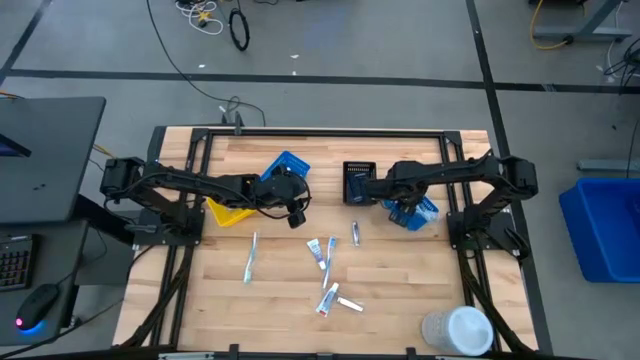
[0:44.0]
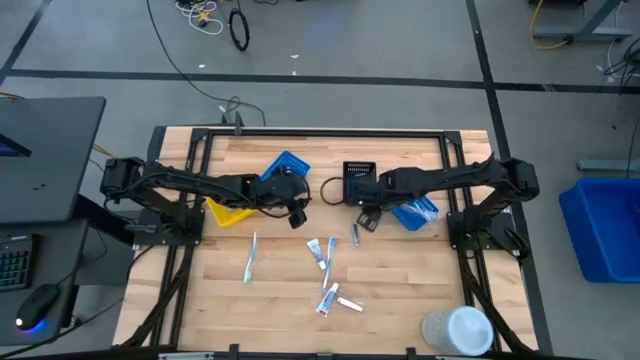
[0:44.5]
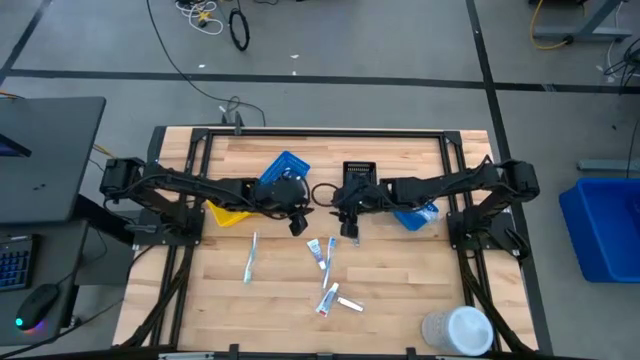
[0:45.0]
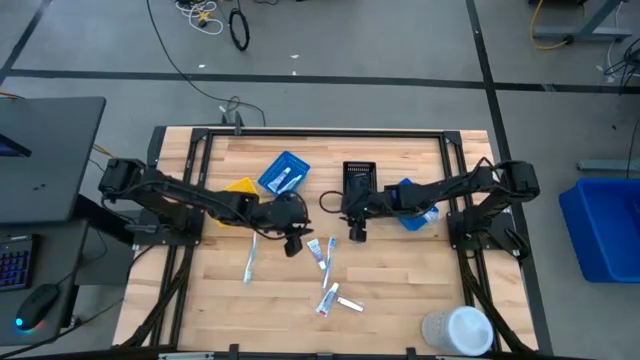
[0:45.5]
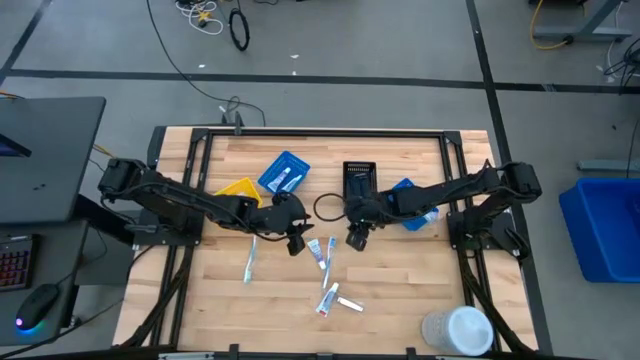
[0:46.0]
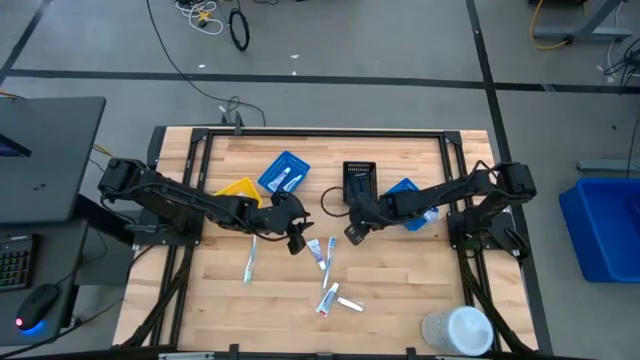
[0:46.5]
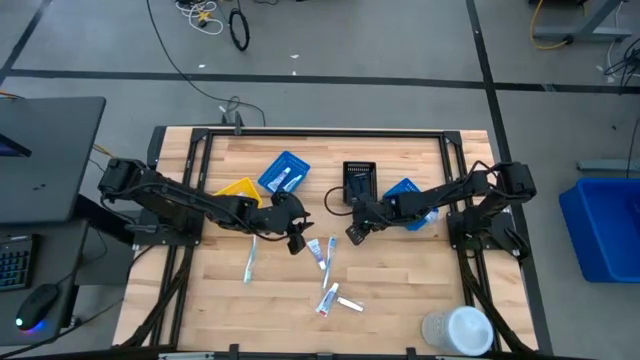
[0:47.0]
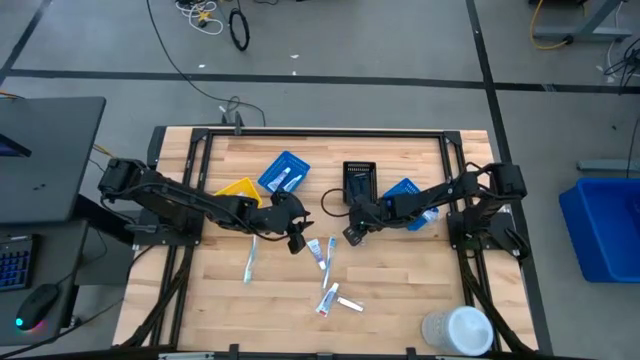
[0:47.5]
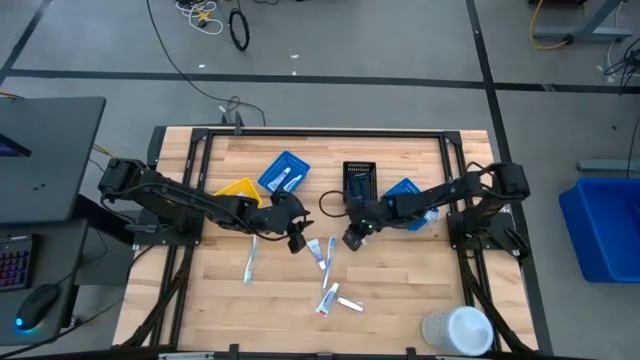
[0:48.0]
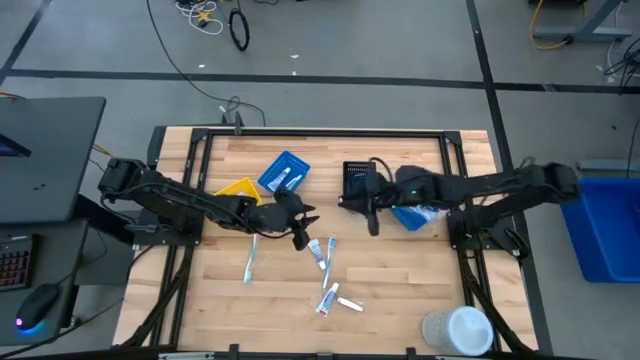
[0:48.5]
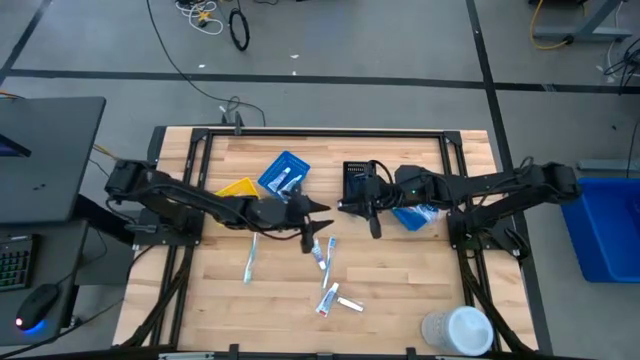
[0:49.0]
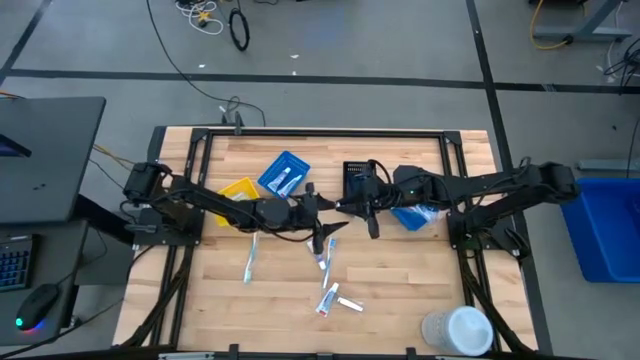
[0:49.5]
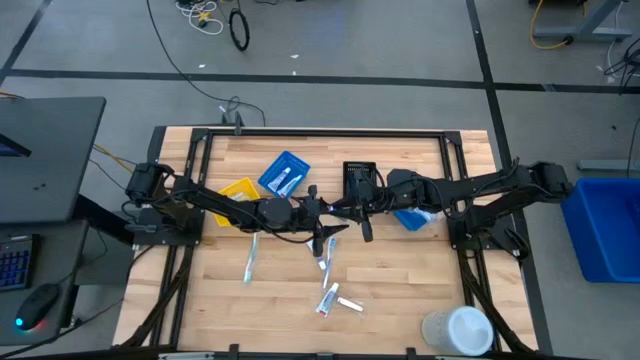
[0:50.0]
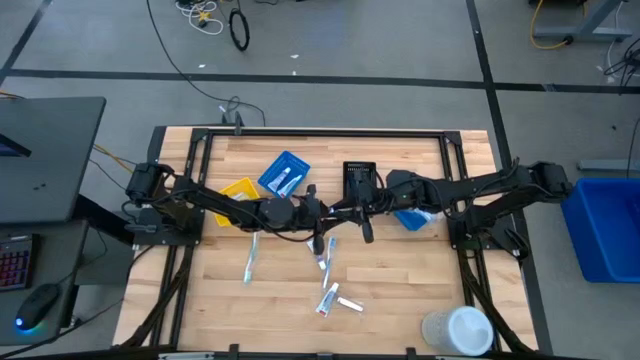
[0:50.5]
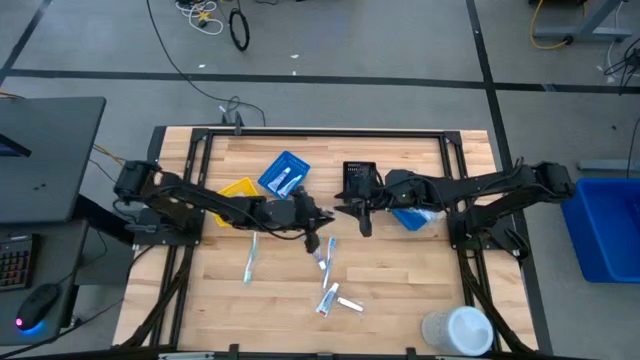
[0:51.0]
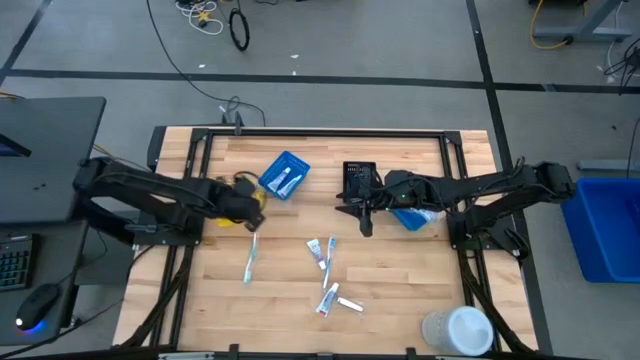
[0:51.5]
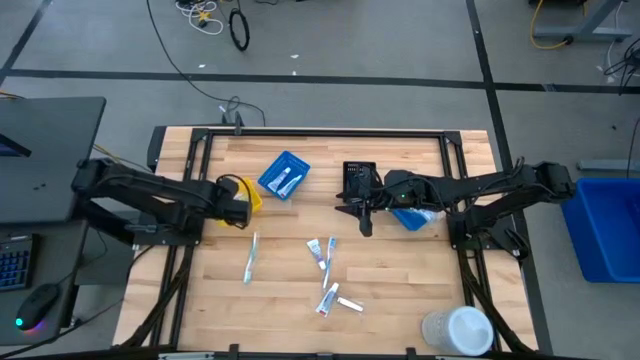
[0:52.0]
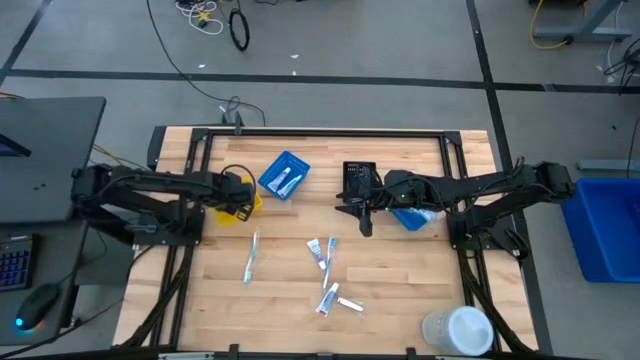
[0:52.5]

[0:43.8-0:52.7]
Task: Pick & Place Travel size toiletries
Put the silver nail cutter into the yellow bin

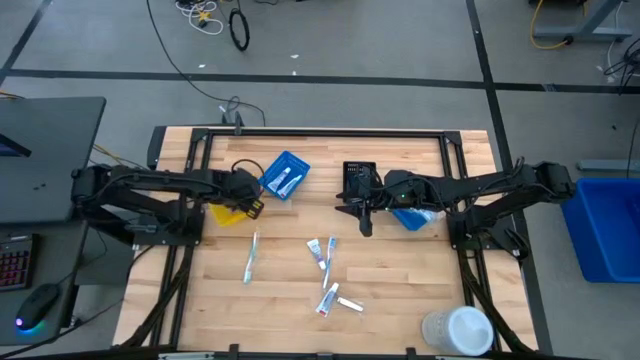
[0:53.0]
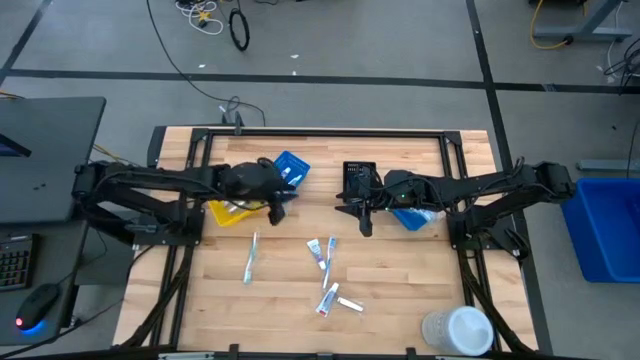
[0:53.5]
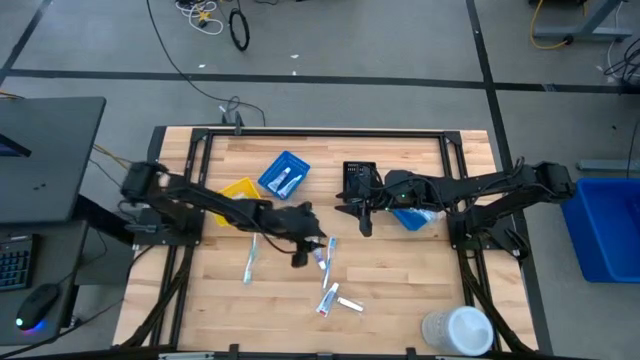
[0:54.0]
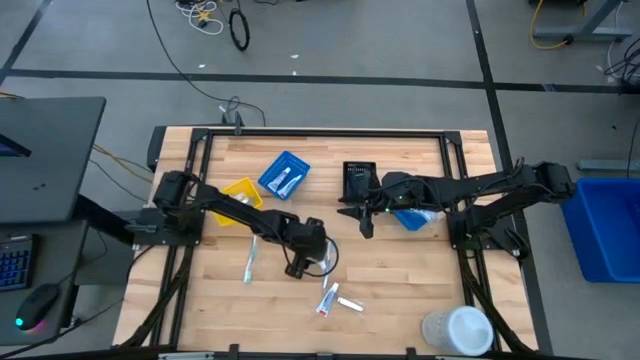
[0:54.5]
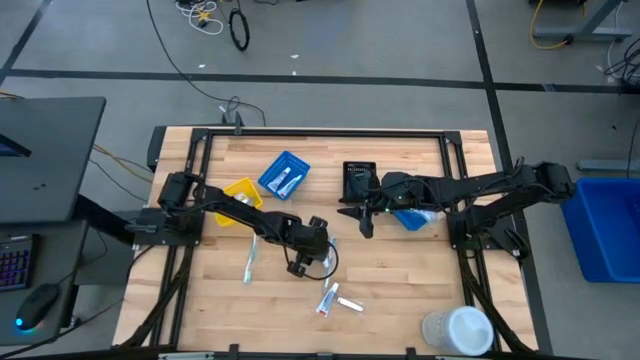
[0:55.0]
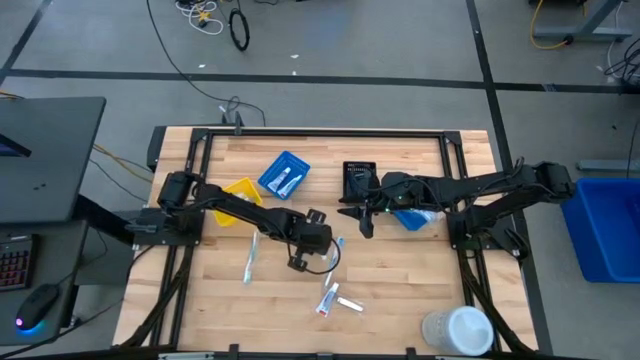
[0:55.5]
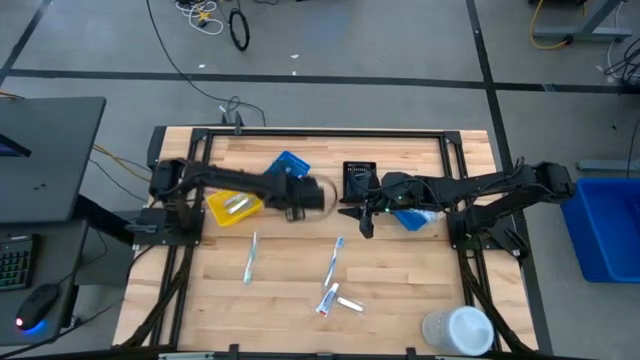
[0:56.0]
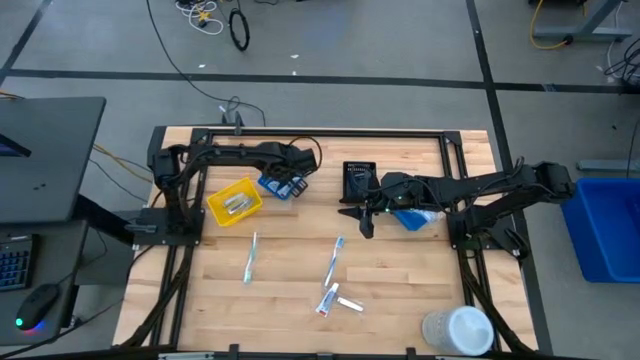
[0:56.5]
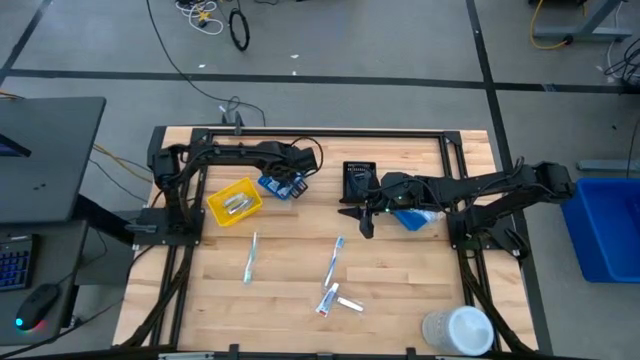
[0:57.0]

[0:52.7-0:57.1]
Put the violet toothpaste into the left blue bin

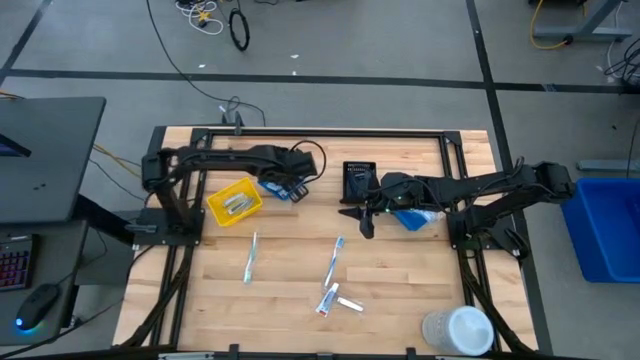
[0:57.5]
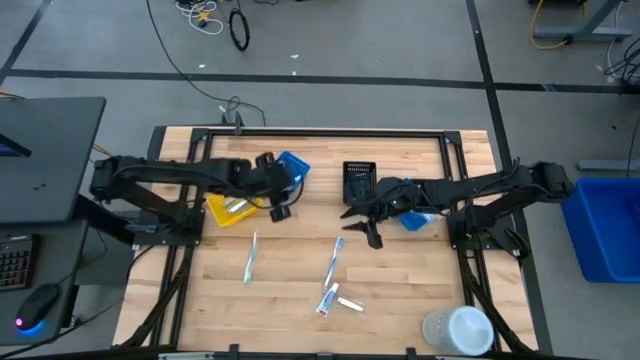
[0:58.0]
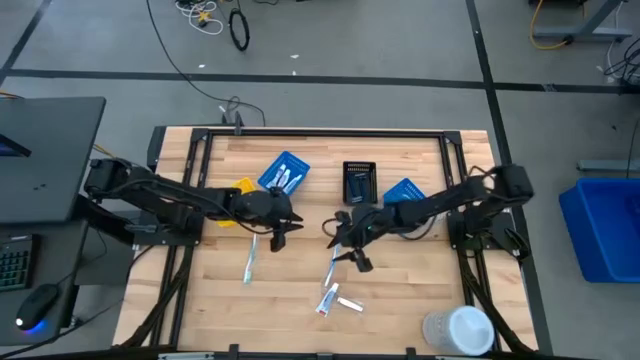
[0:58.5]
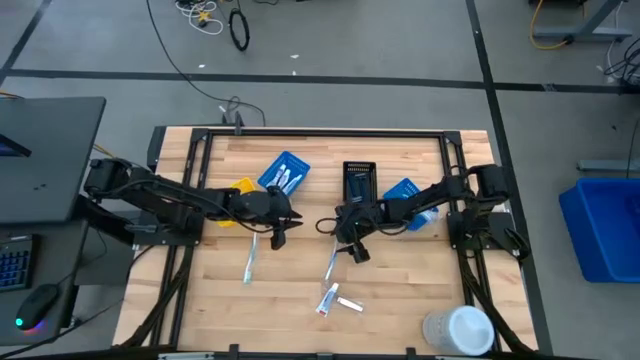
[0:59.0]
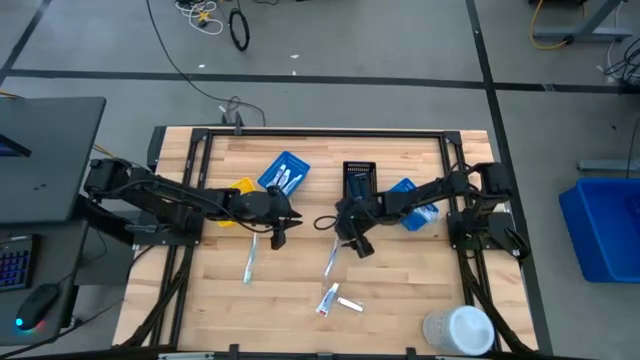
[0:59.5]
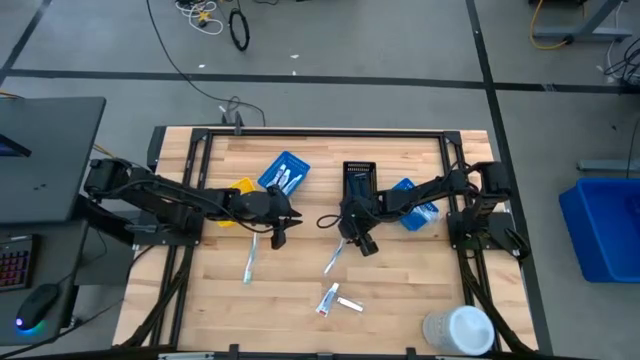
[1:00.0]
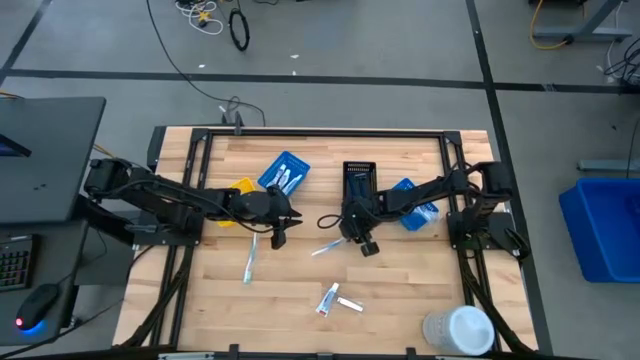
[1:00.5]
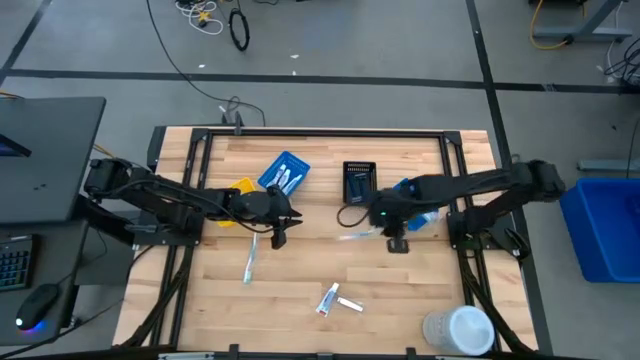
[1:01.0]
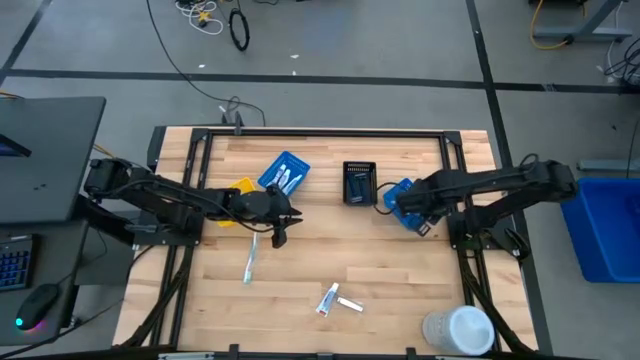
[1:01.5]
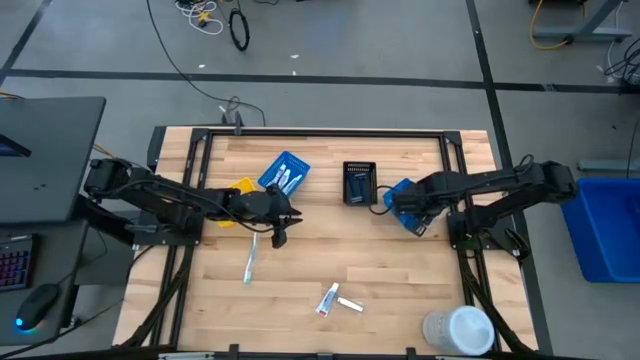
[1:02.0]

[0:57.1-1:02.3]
Put the blue toothbrush into the right blue bin

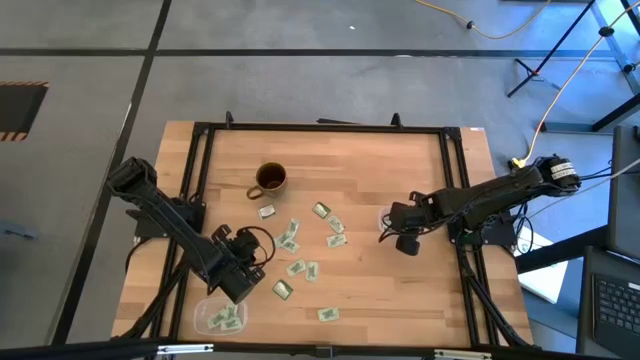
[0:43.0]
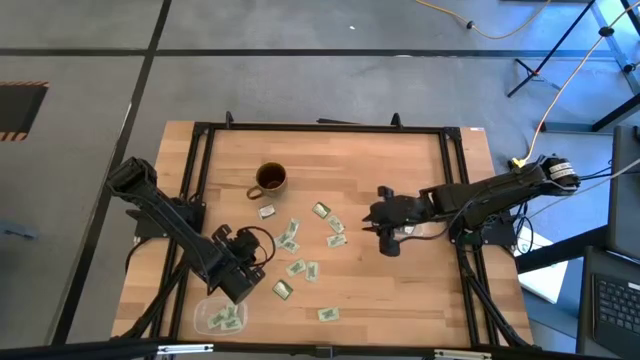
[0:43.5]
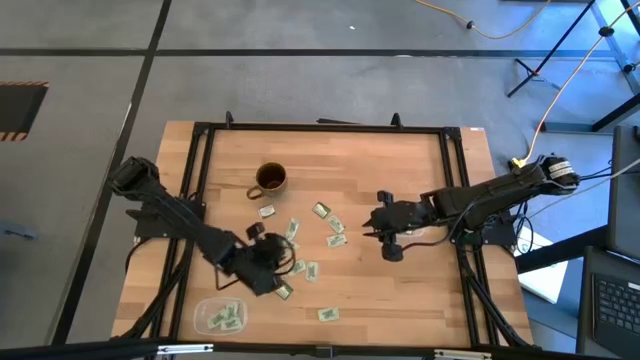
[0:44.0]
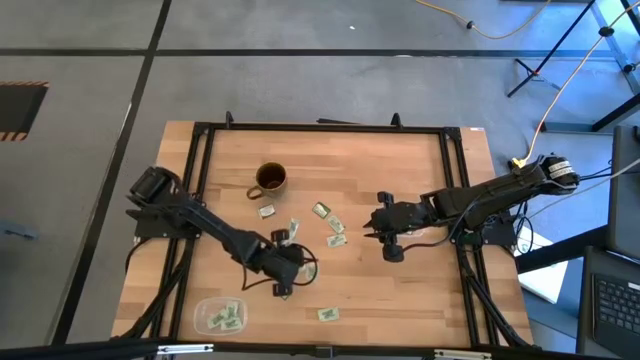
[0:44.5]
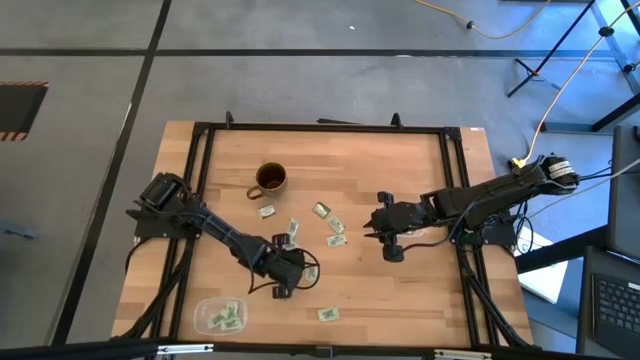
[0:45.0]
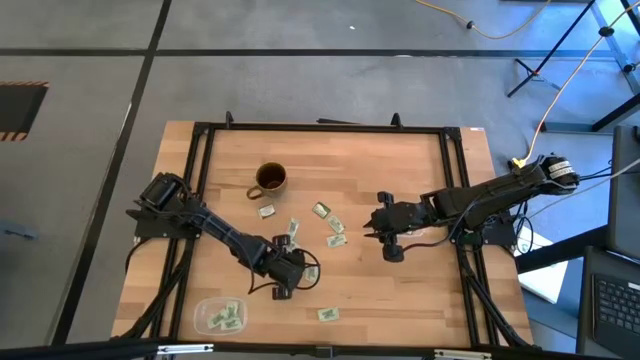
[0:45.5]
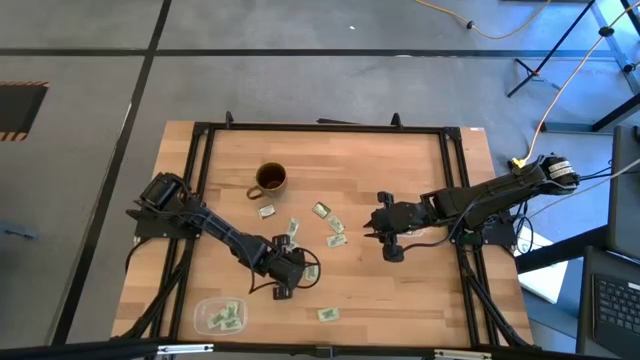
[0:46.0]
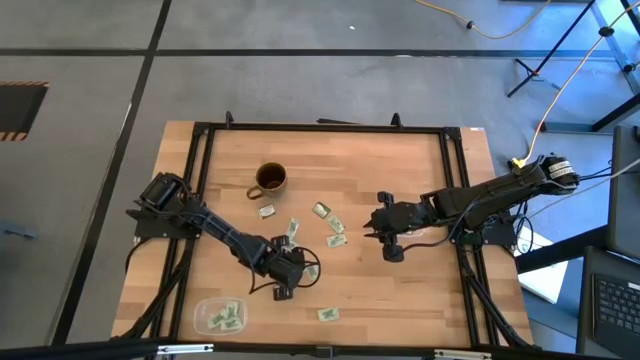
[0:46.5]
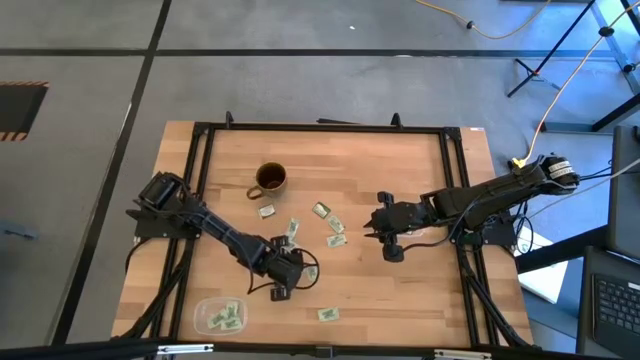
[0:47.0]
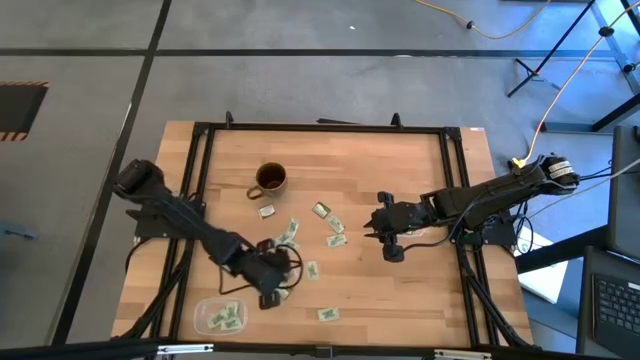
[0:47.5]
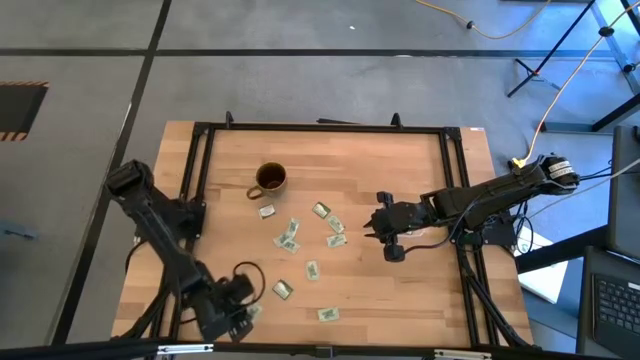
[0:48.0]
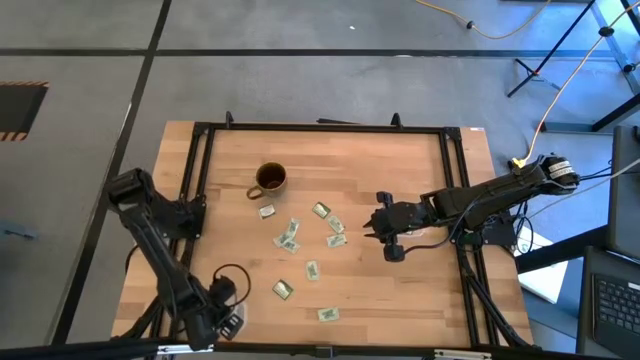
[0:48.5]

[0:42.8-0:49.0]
Task: Pick and place Stevia / Truvia into bins
Put the stevia packet into the bottom transparent container
